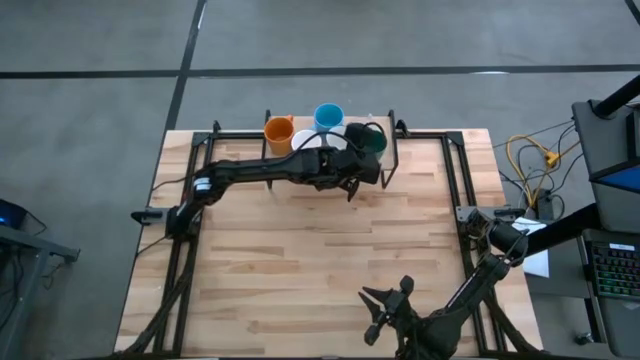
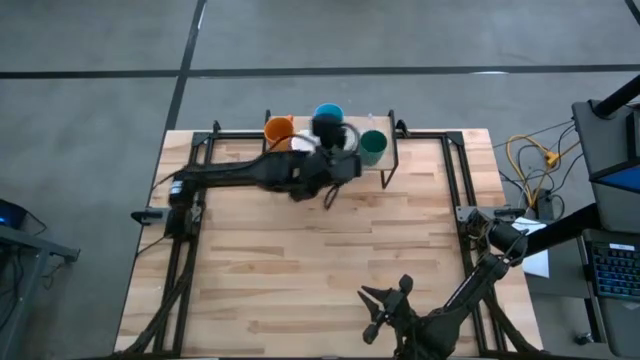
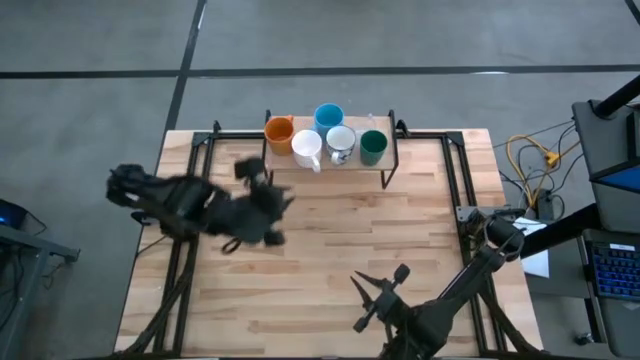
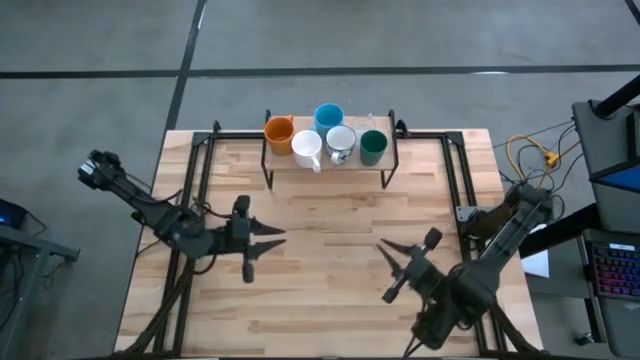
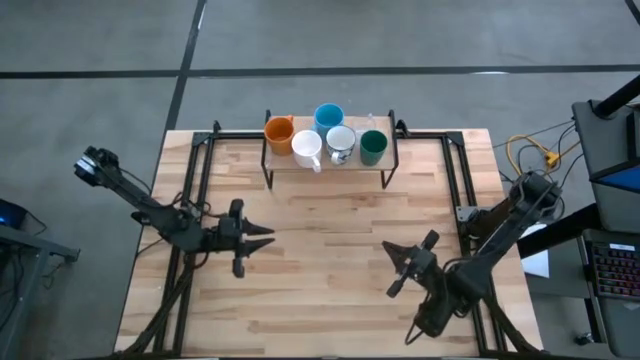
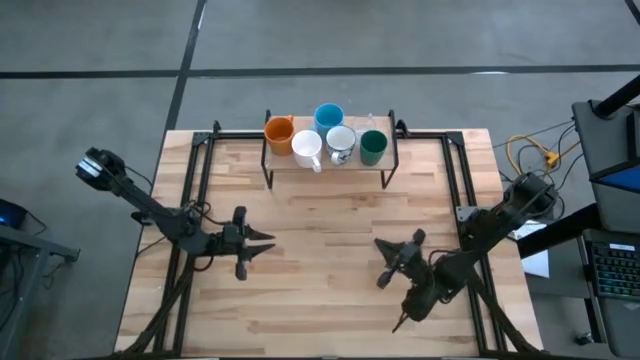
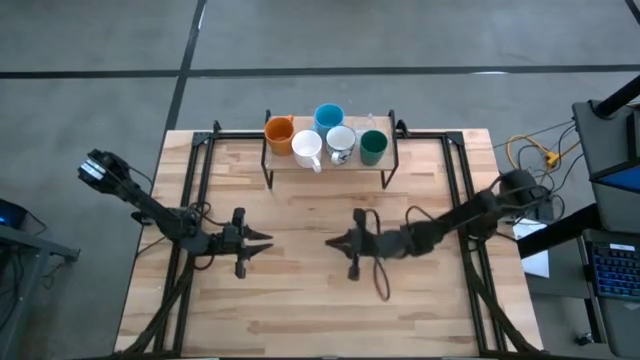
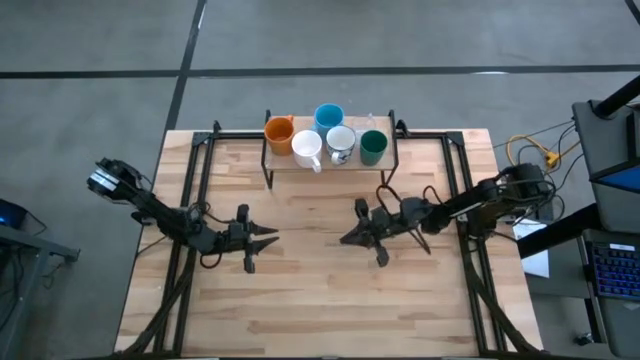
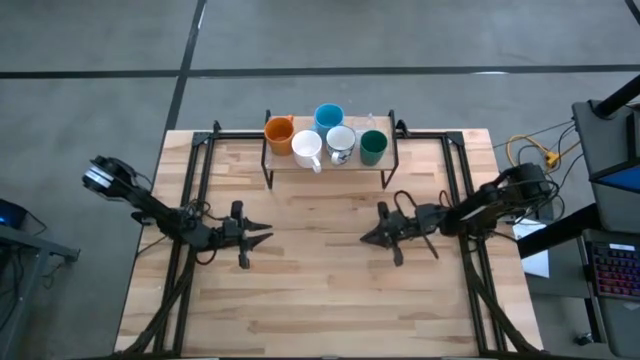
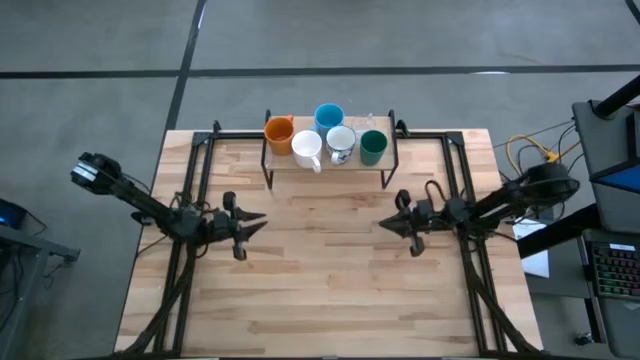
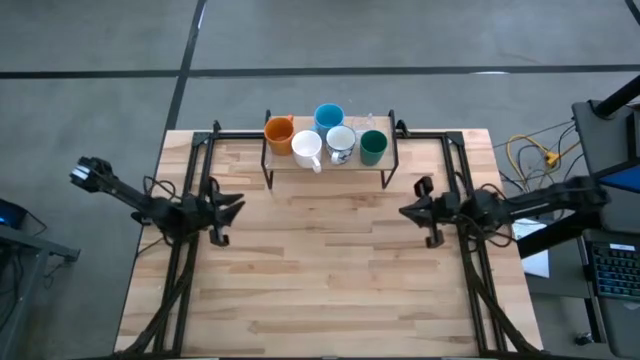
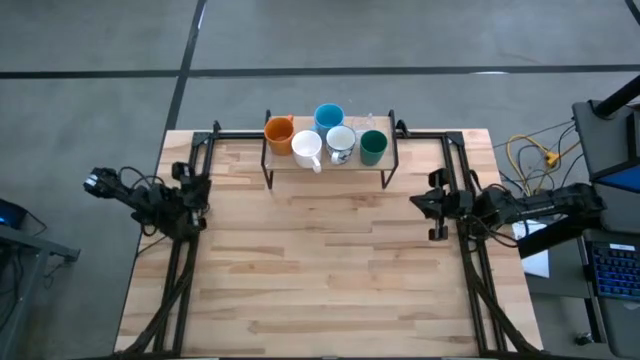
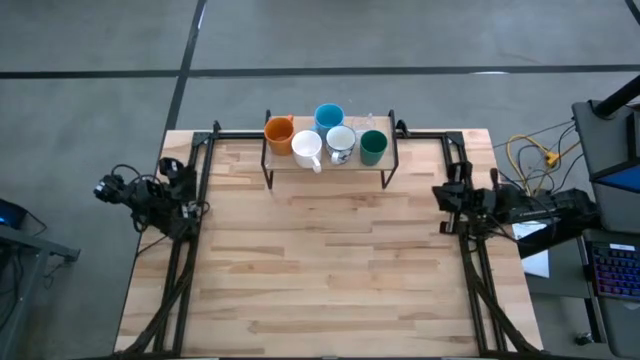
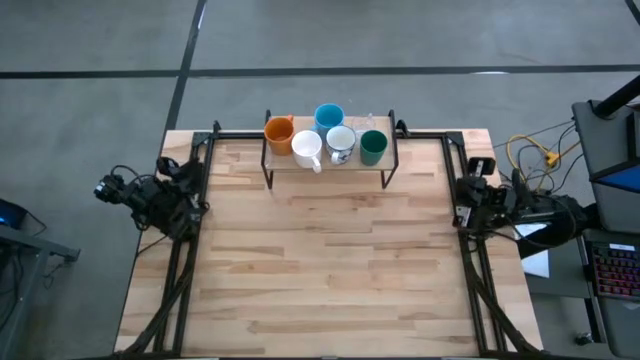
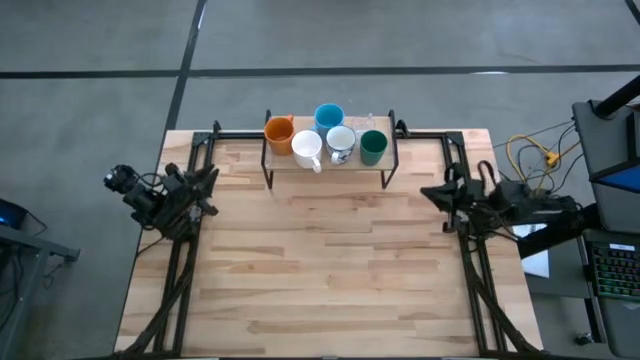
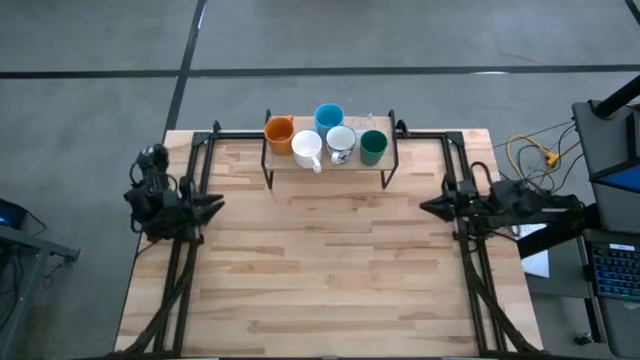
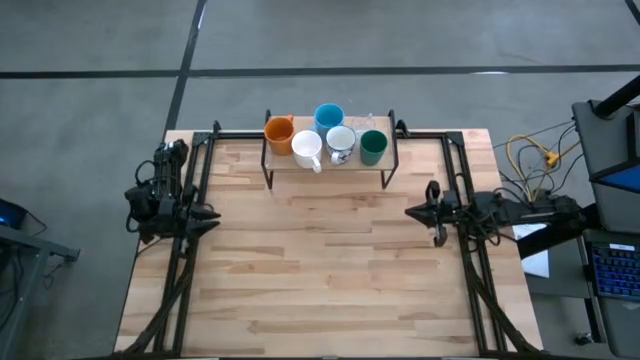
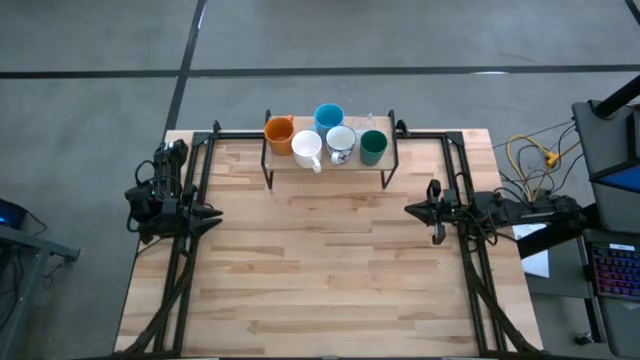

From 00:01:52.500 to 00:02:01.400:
Task: Stack small to large cups/mugs on shelf
Return to Home Position

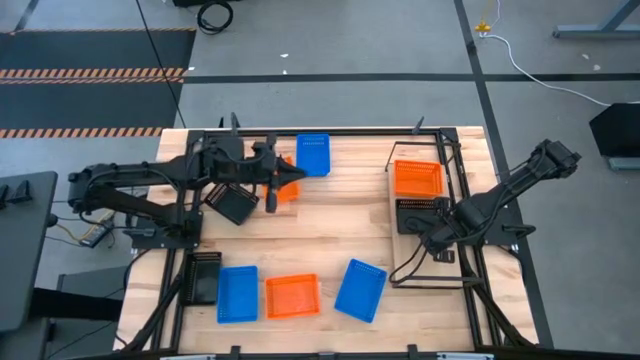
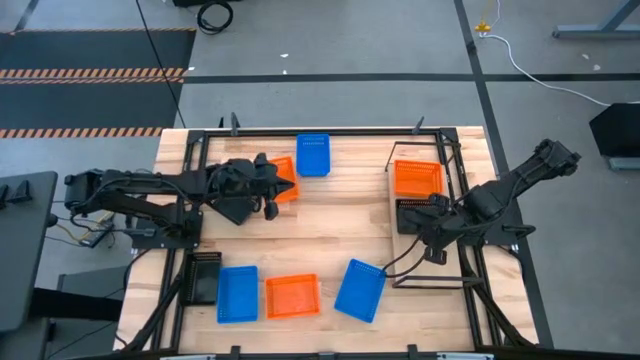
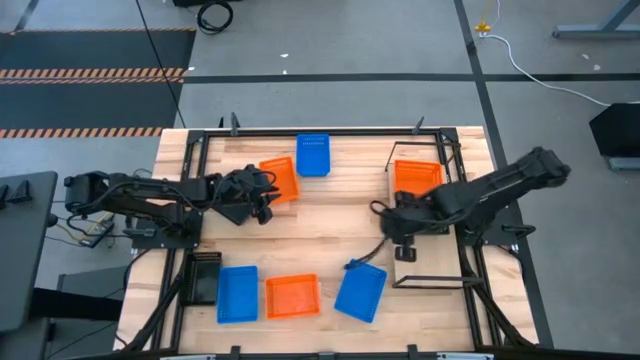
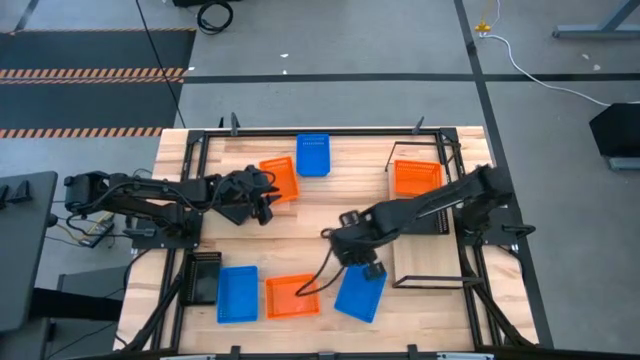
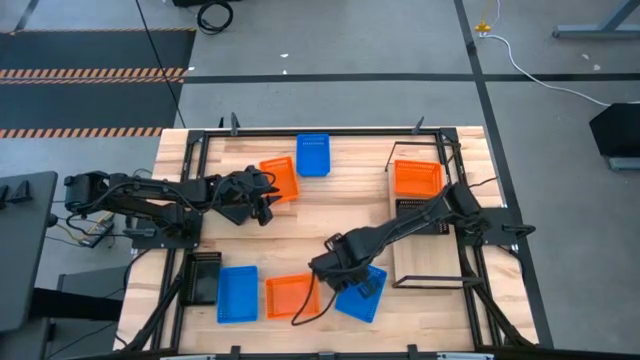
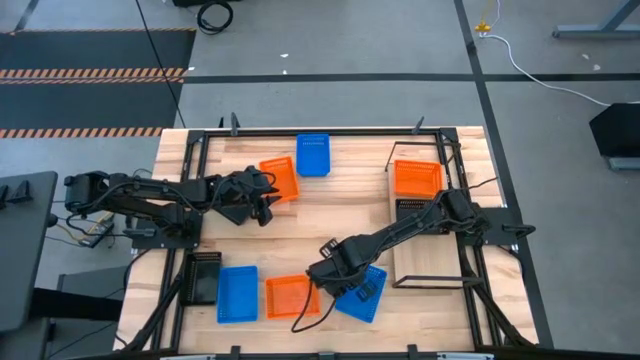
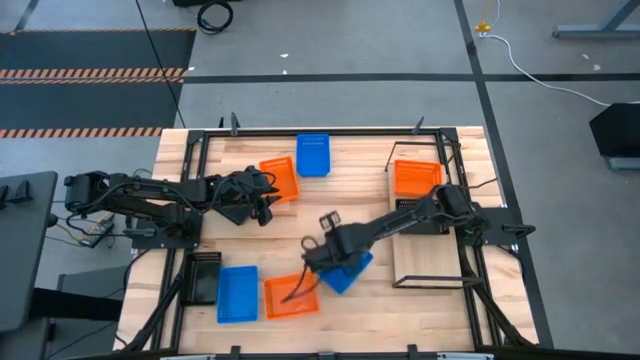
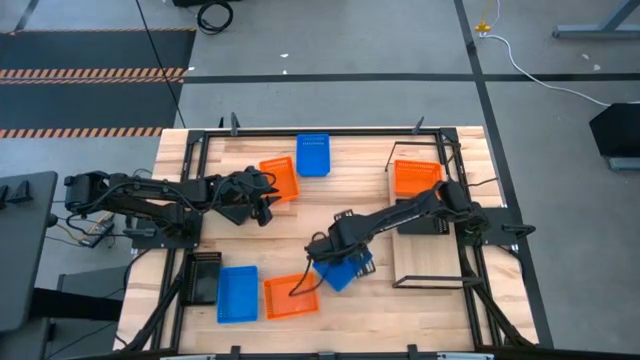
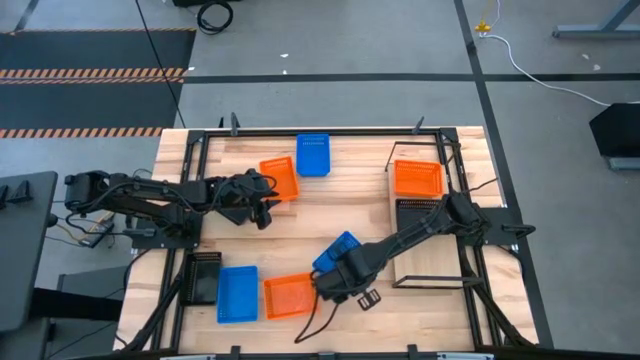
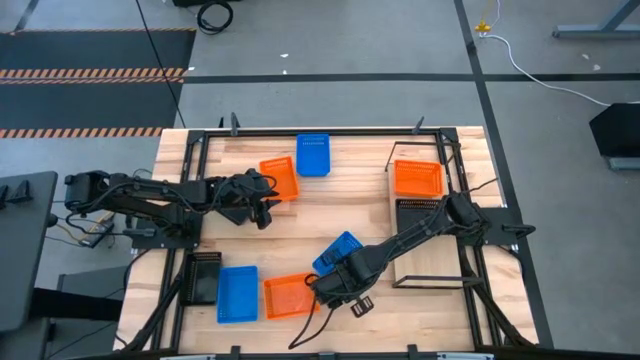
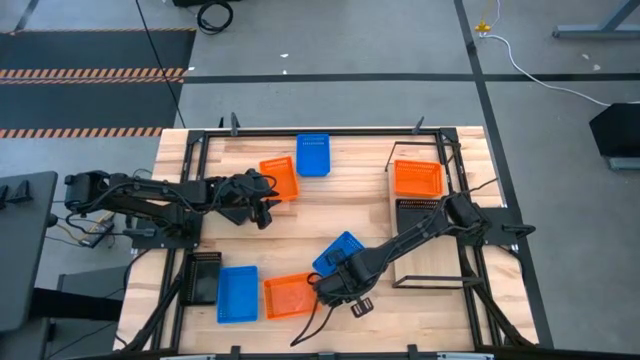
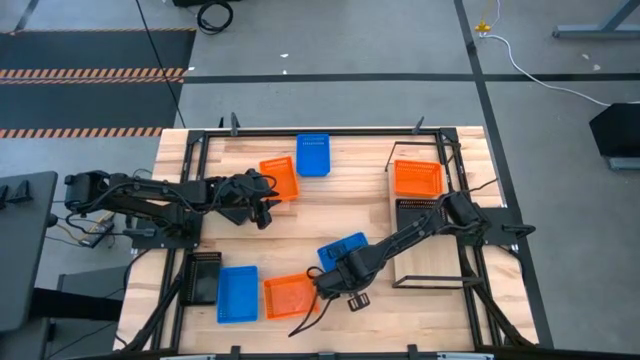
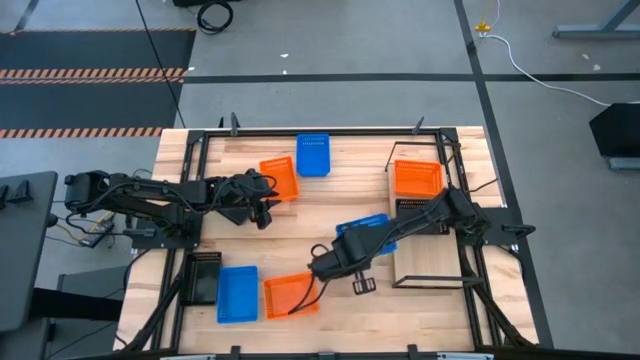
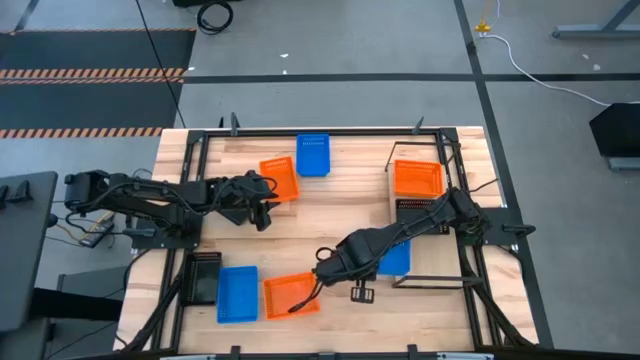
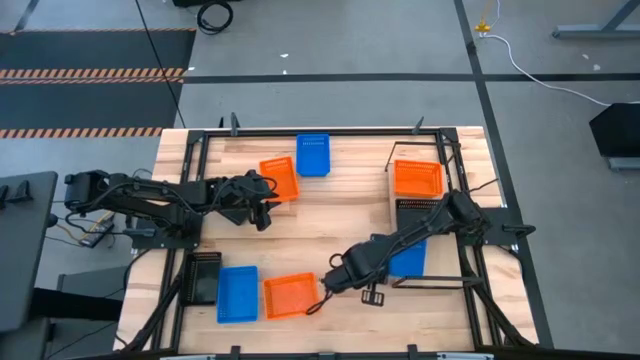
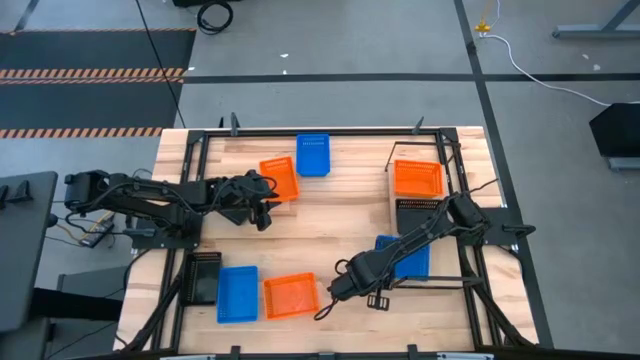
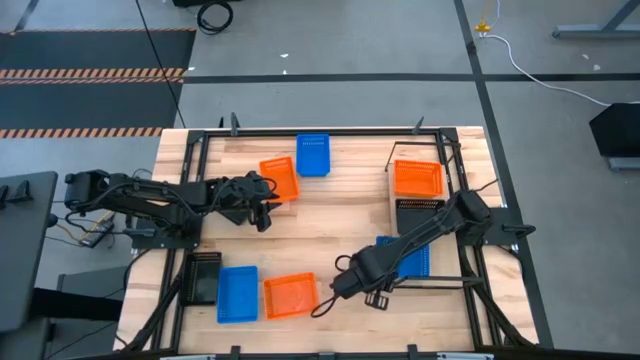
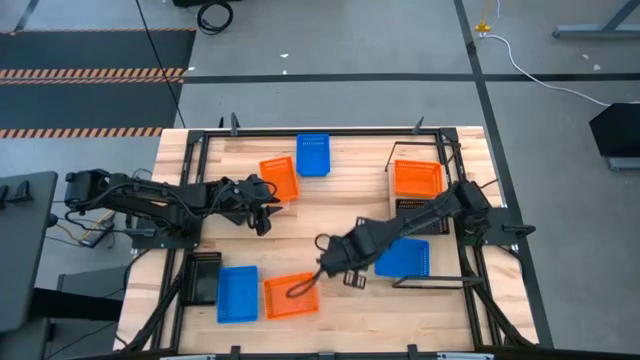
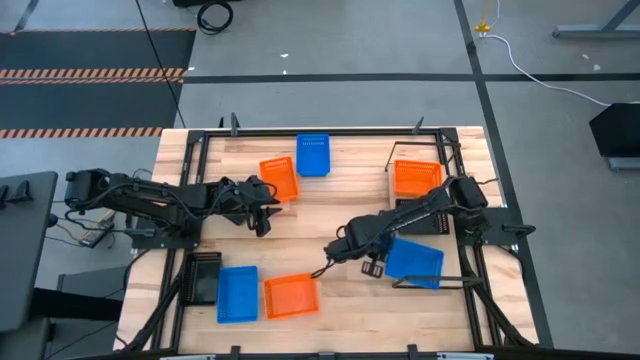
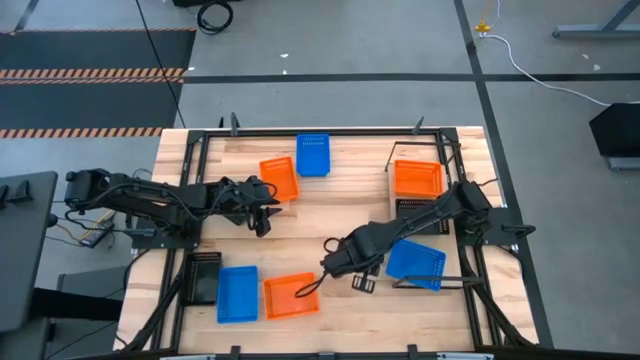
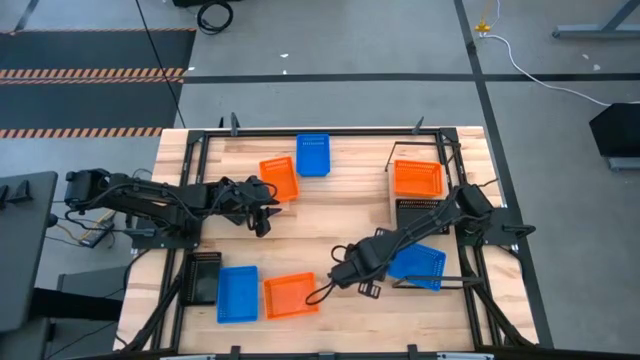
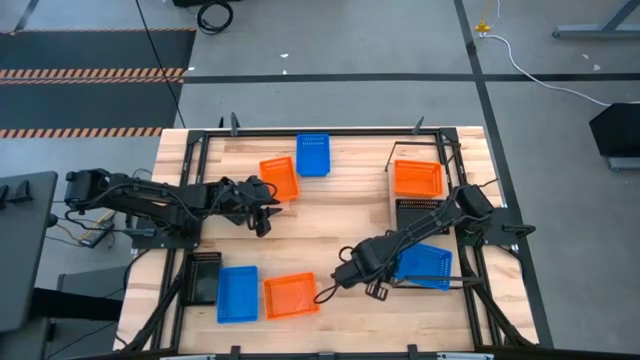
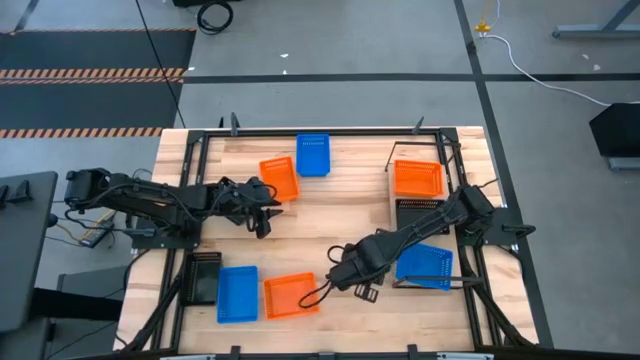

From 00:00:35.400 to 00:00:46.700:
Task: Stack baskets on shelf by color
Put the bottom right blue bin on the shelf
